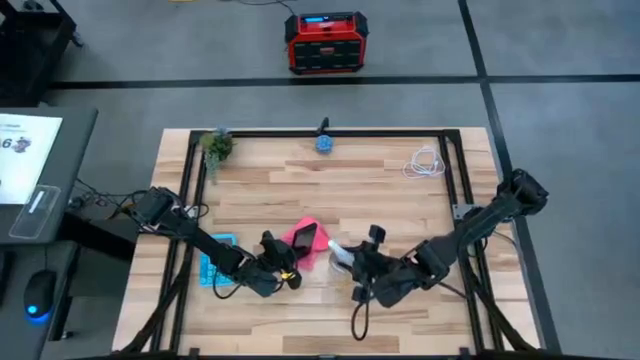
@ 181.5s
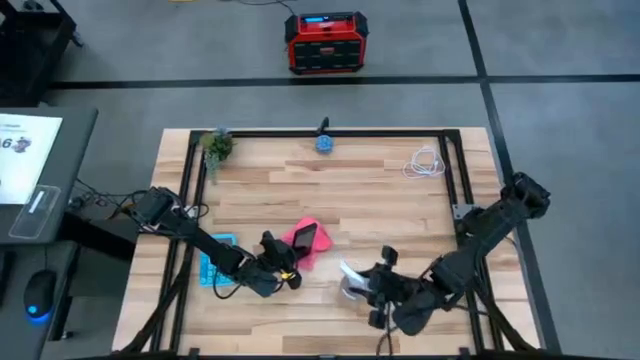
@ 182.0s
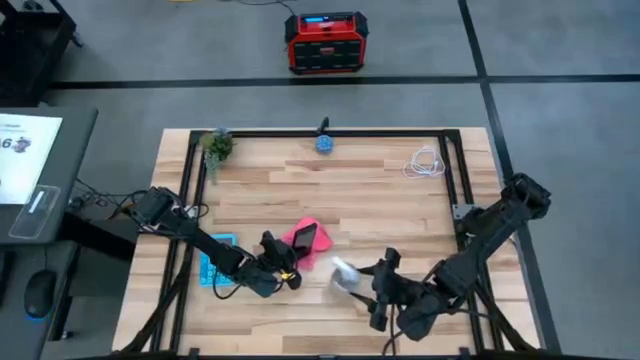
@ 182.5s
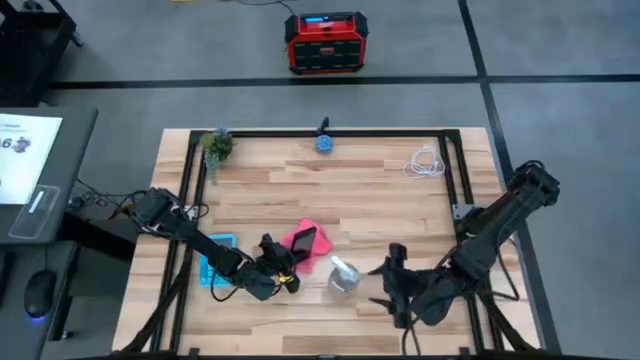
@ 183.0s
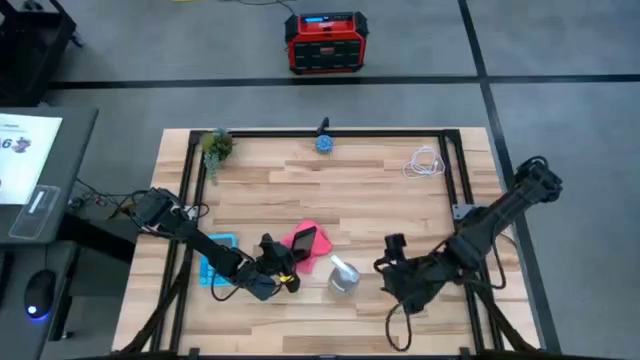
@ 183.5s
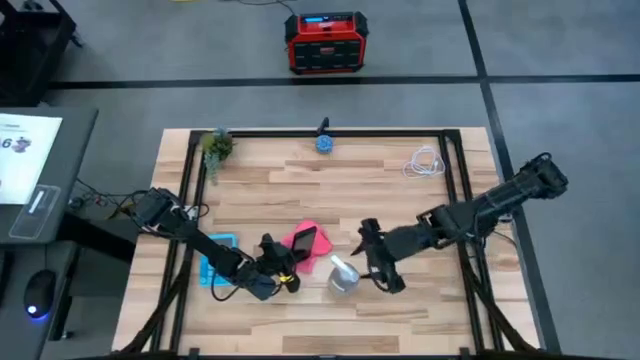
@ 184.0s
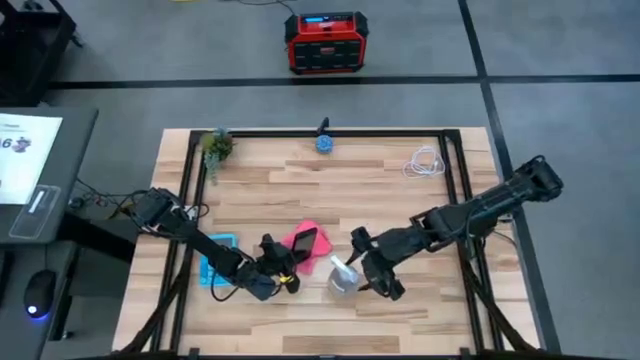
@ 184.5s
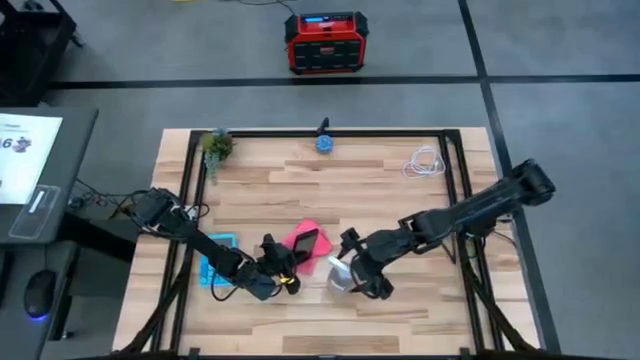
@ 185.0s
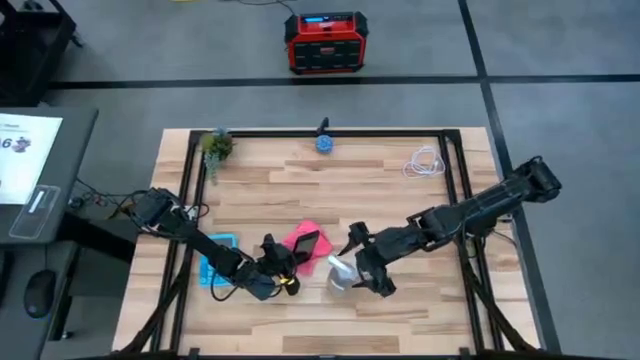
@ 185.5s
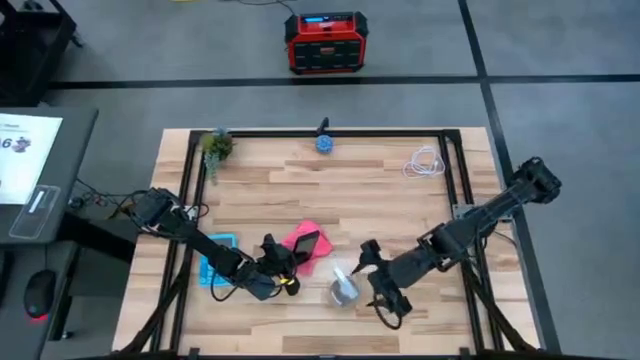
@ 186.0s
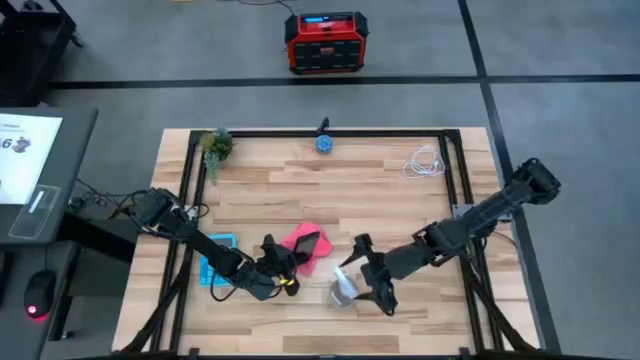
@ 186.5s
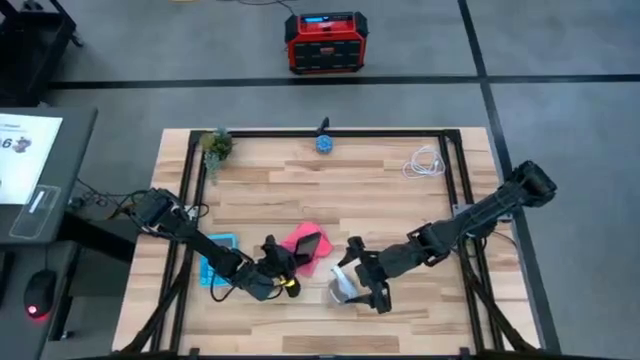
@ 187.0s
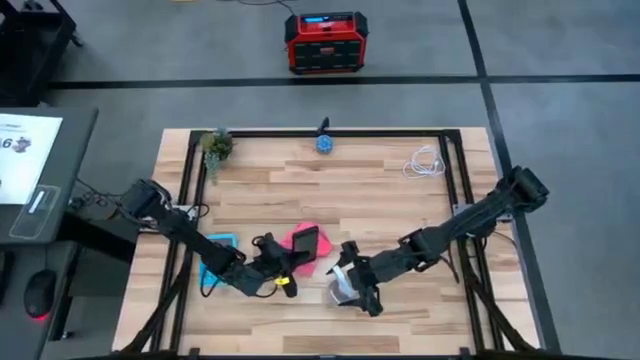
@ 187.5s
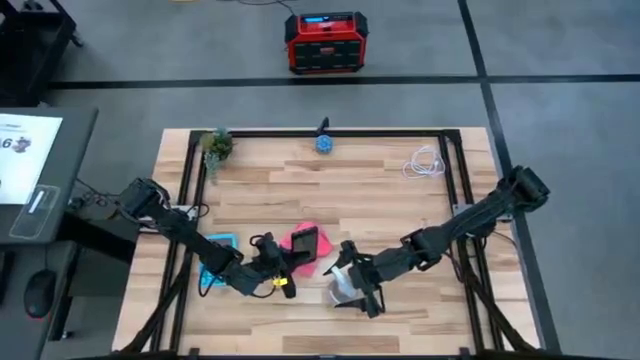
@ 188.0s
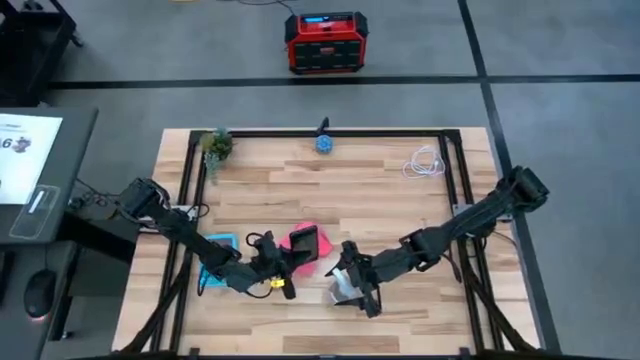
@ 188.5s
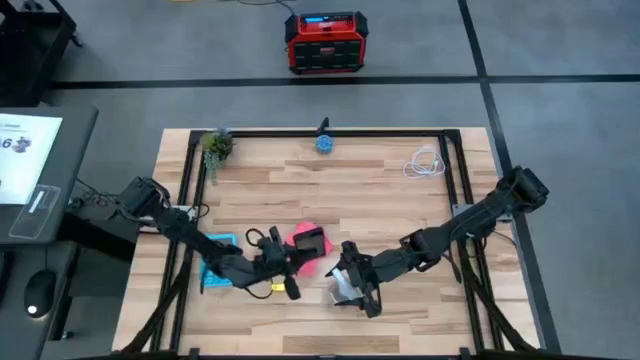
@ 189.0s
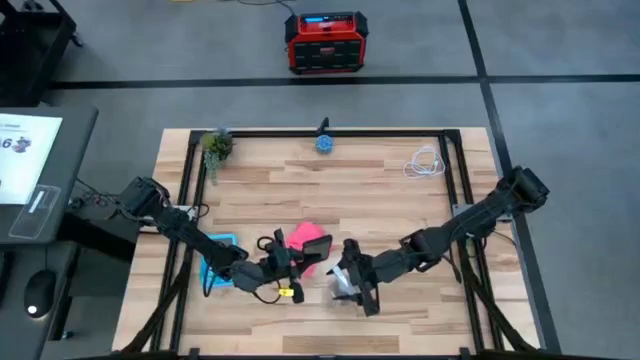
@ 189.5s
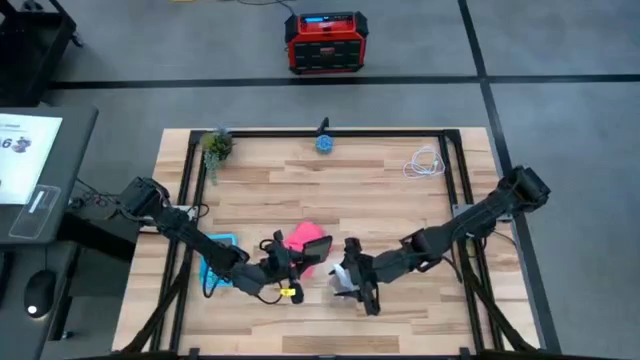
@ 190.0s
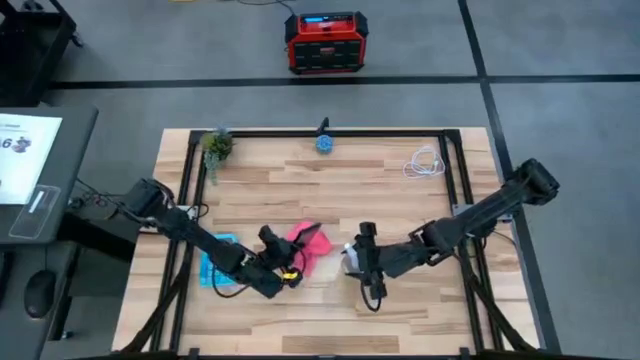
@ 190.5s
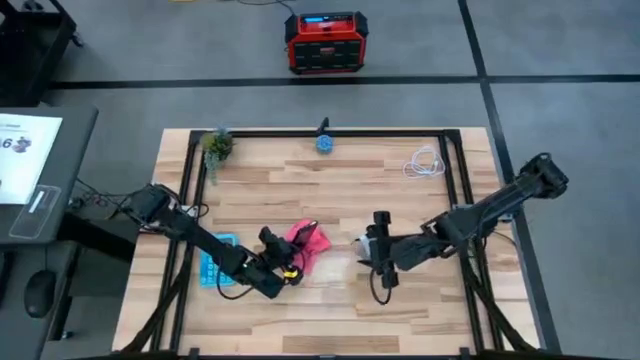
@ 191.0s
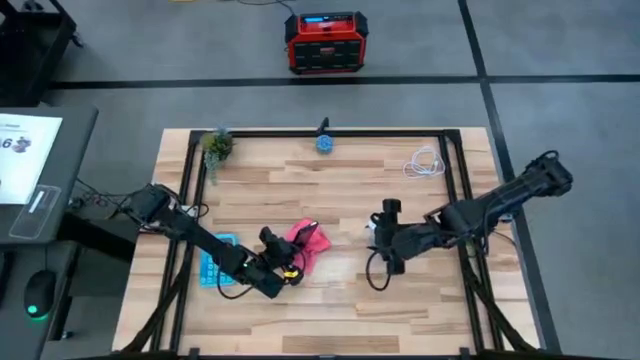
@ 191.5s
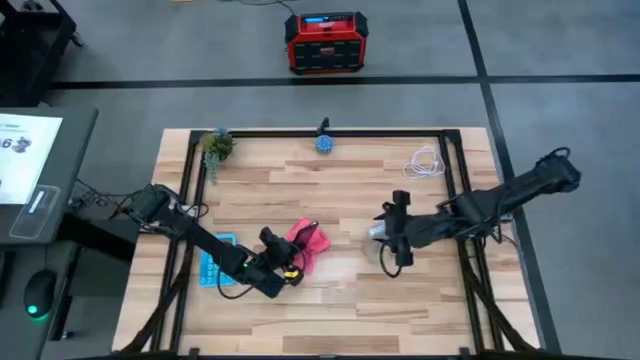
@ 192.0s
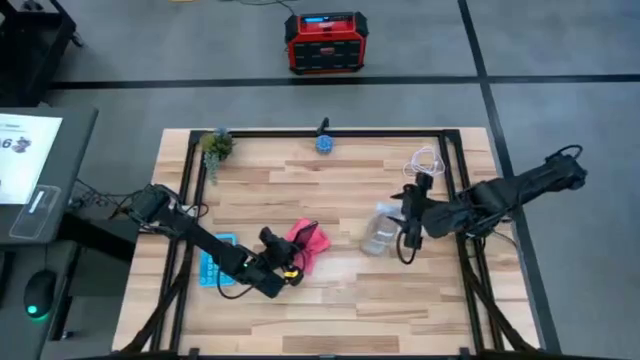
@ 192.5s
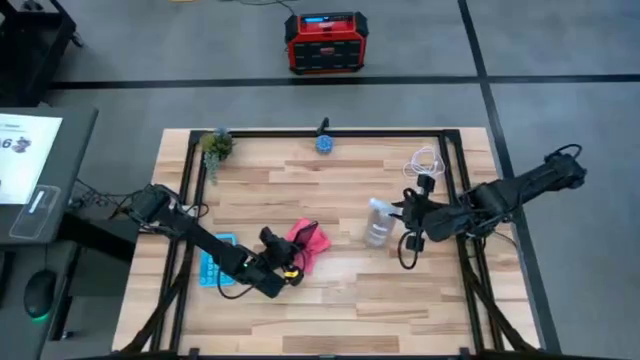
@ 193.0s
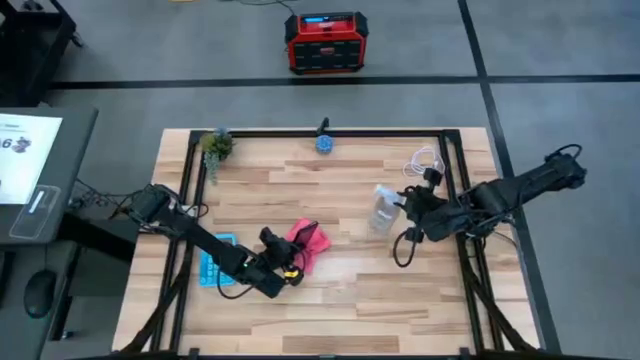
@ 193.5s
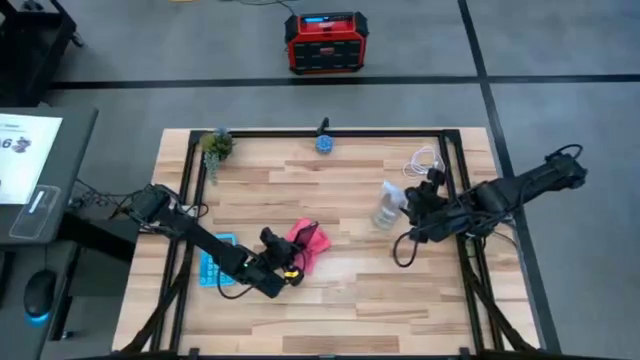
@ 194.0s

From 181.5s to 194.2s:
Task: Apply microfiber cloth
Spray the front of the black cellphone using transparent spray bottle

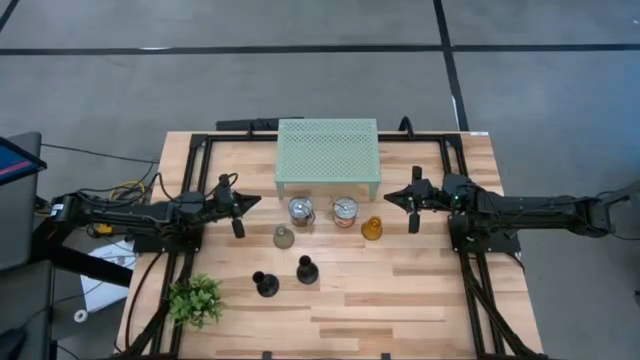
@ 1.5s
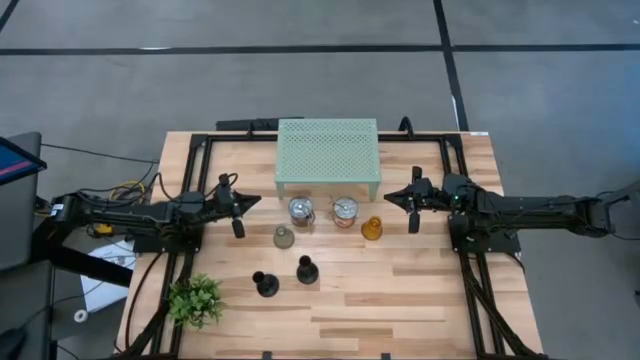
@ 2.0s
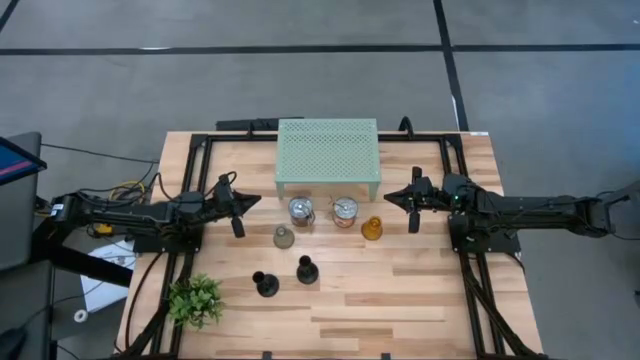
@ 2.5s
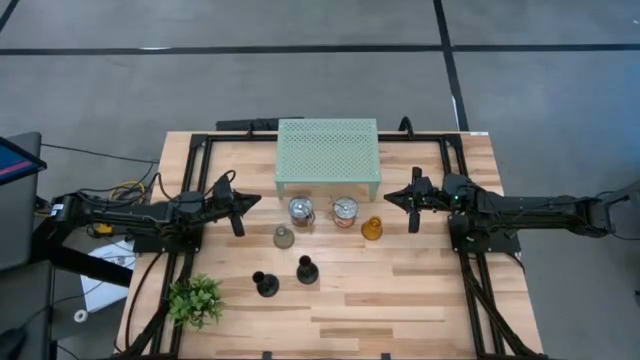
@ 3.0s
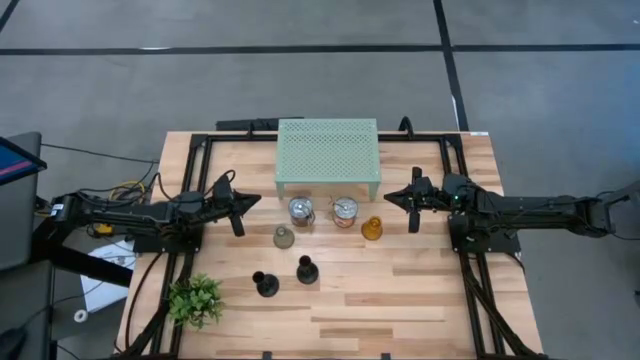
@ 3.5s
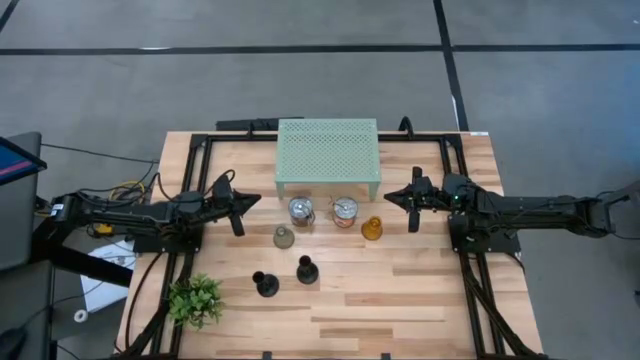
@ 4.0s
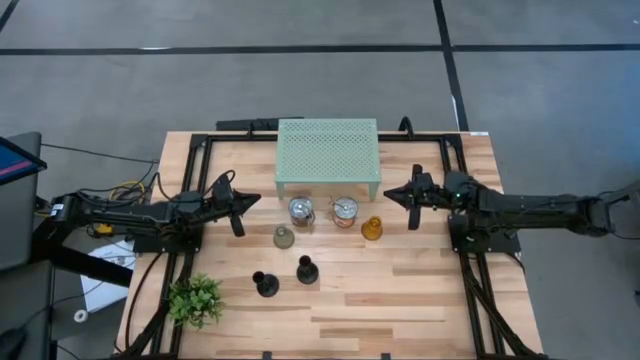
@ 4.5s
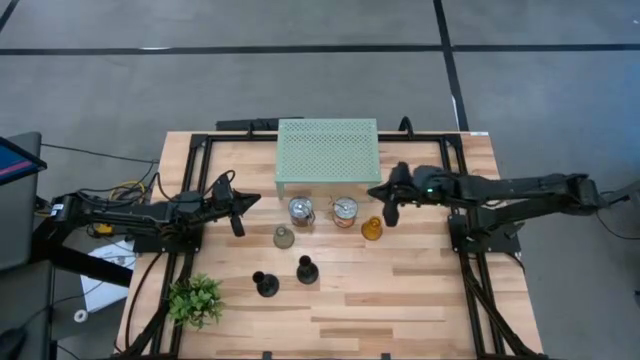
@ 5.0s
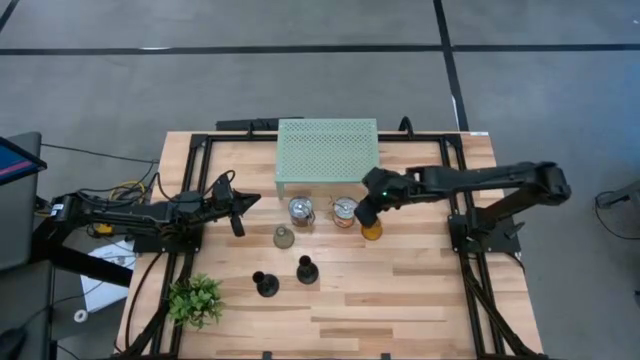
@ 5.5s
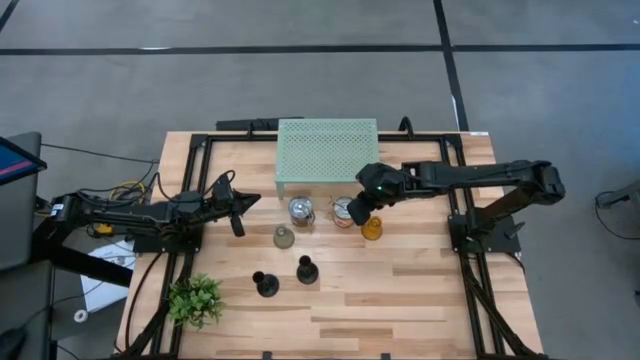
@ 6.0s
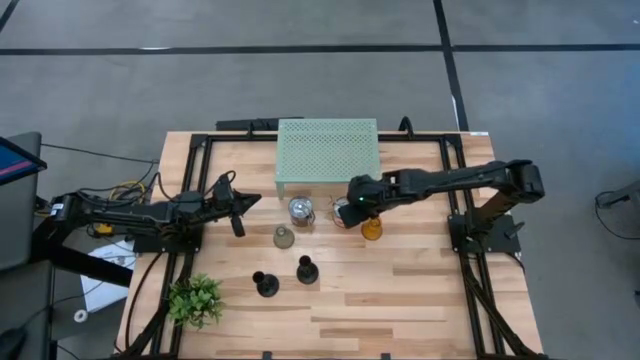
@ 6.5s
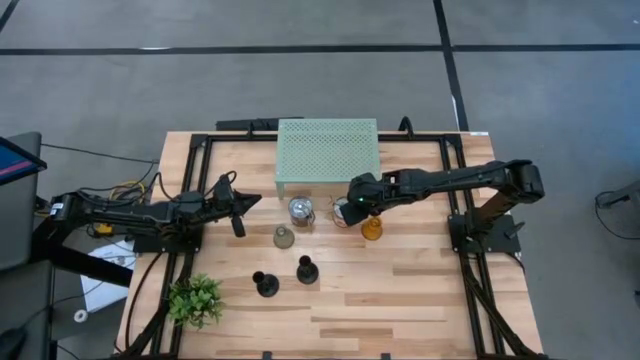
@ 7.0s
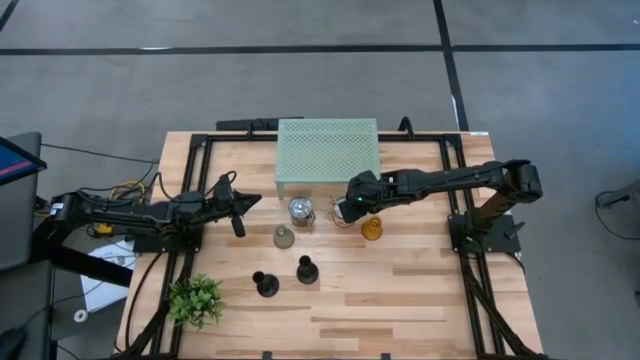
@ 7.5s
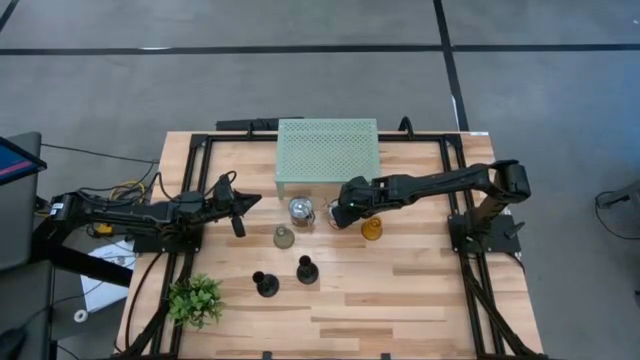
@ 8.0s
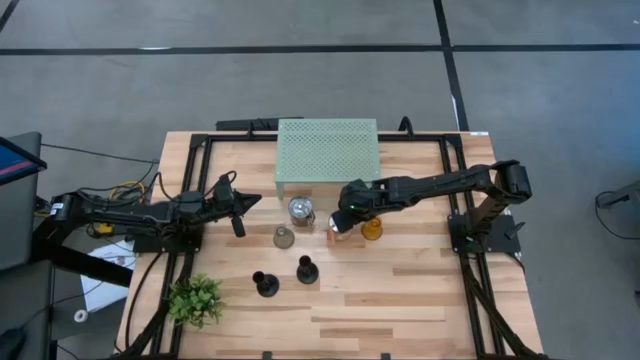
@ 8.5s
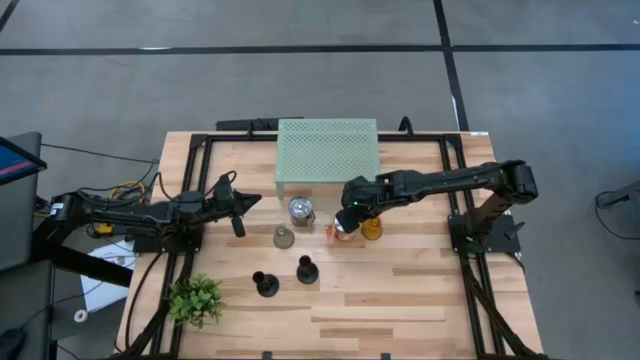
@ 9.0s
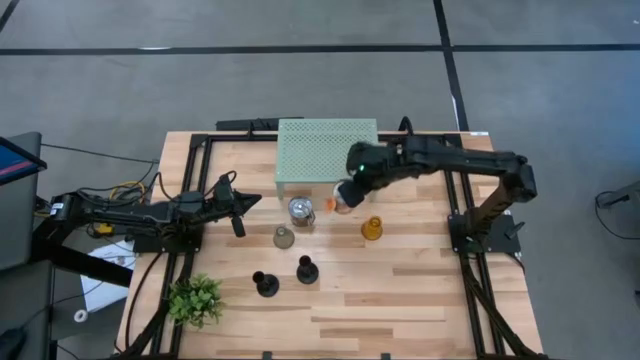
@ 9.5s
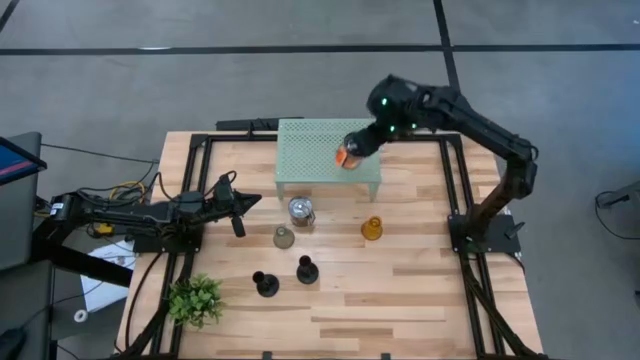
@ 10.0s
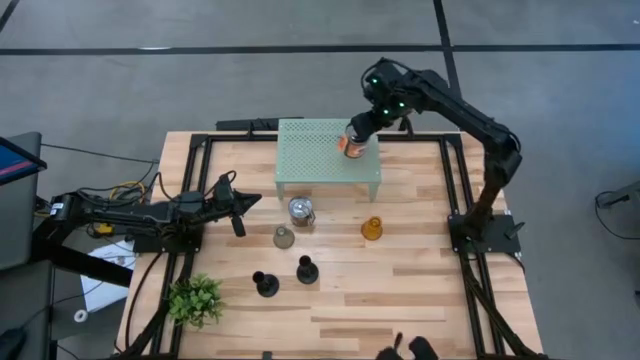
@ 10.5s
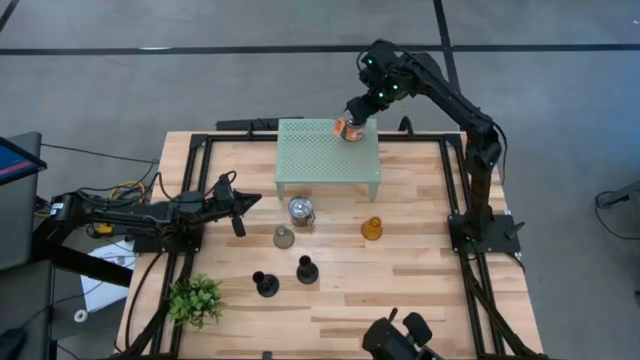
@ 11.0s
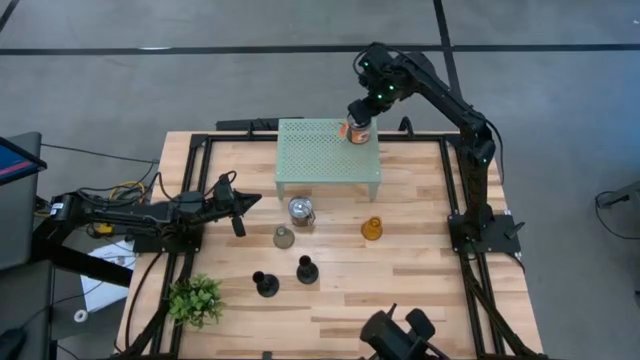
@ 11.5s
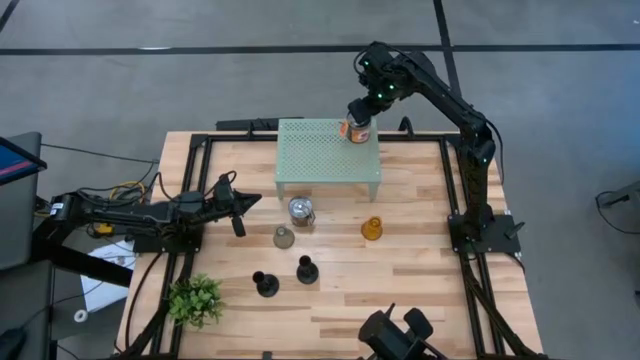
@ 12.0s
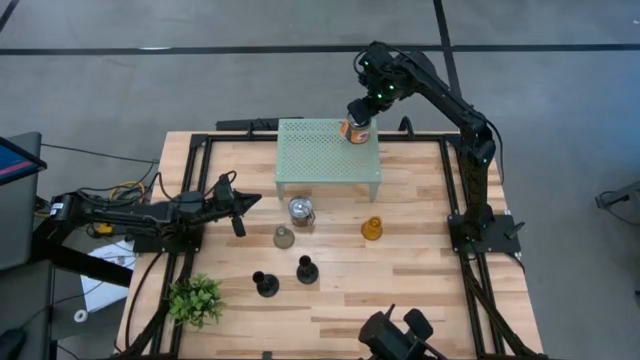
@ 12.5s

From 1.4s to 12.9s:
Task: Pick & Place candle stick holders
Put the right scented candle on the shelf
